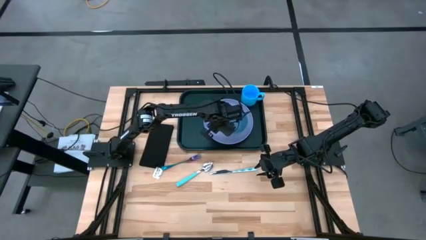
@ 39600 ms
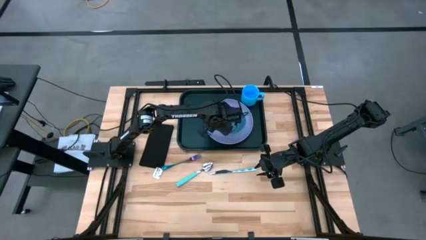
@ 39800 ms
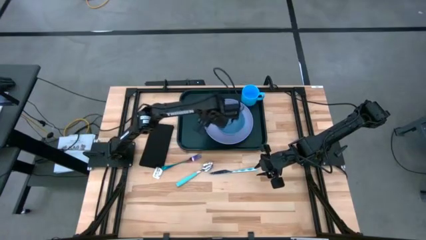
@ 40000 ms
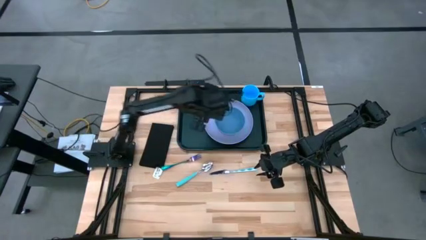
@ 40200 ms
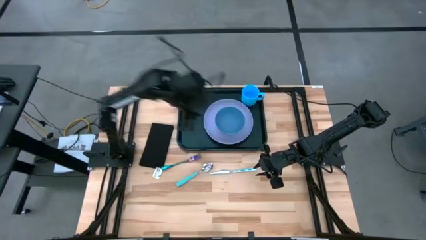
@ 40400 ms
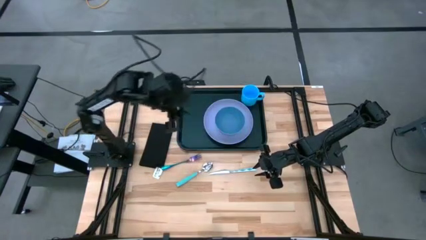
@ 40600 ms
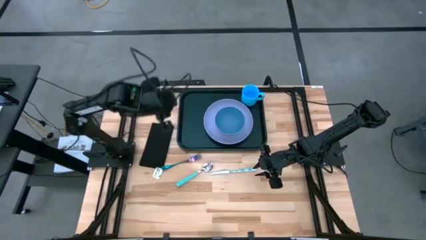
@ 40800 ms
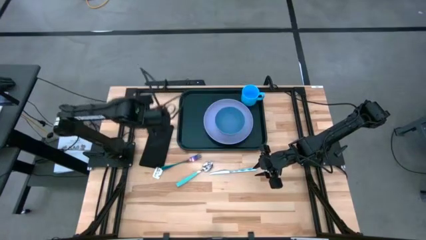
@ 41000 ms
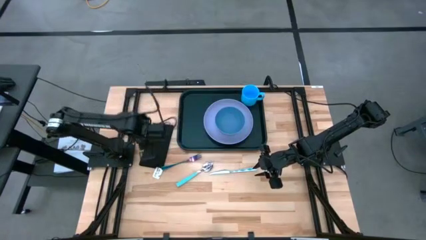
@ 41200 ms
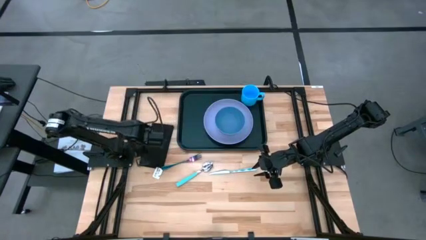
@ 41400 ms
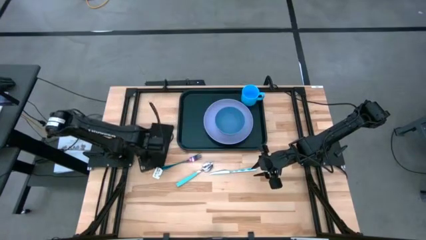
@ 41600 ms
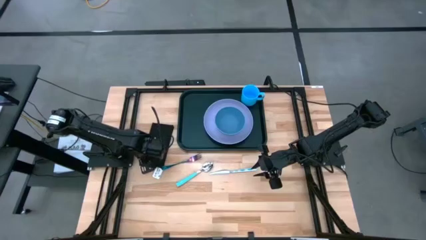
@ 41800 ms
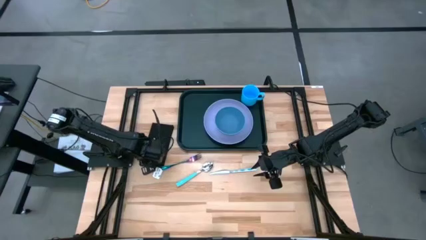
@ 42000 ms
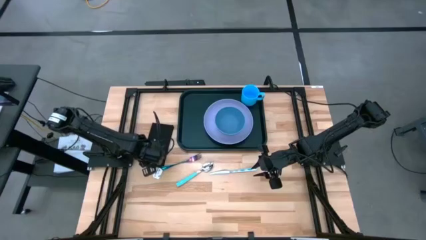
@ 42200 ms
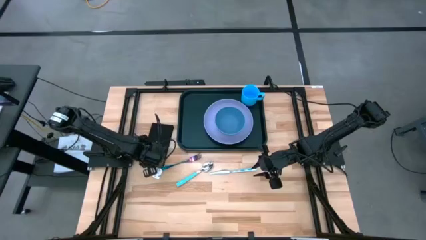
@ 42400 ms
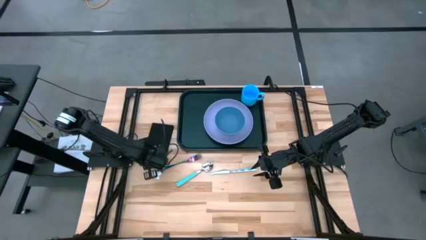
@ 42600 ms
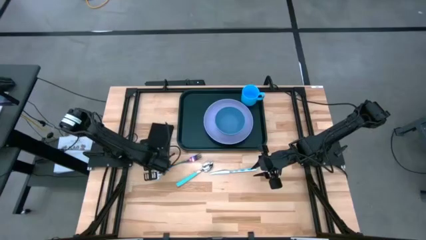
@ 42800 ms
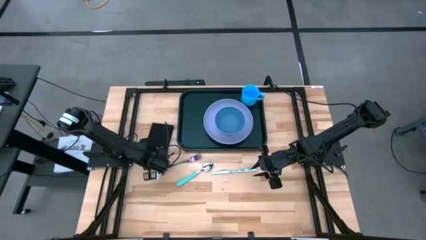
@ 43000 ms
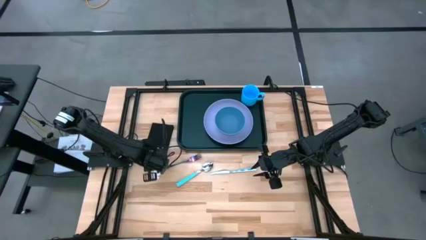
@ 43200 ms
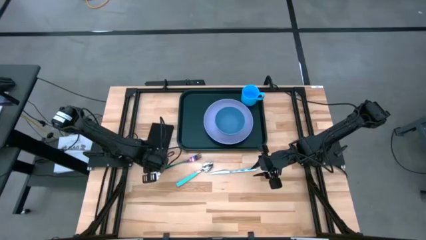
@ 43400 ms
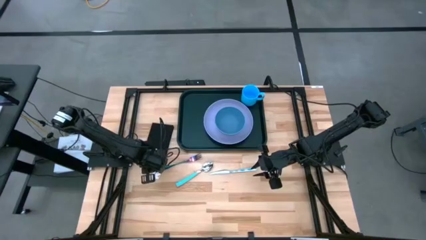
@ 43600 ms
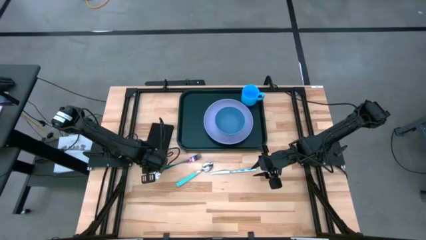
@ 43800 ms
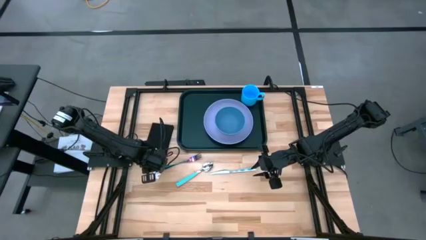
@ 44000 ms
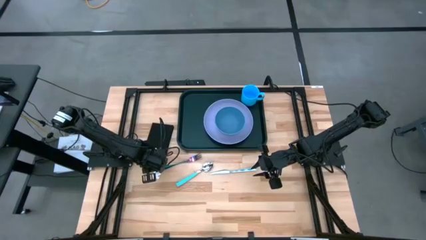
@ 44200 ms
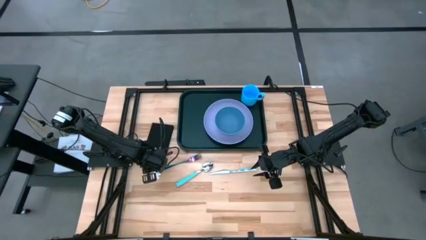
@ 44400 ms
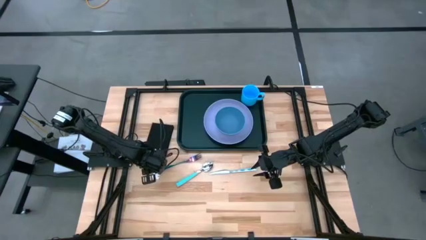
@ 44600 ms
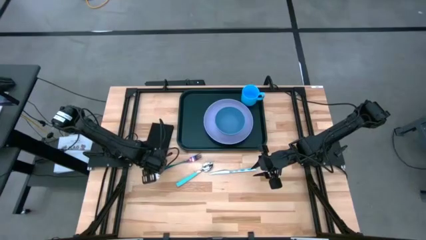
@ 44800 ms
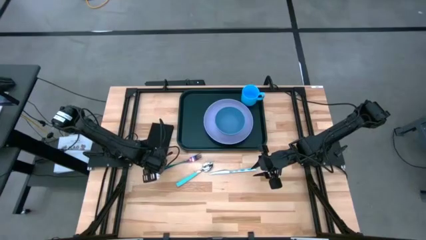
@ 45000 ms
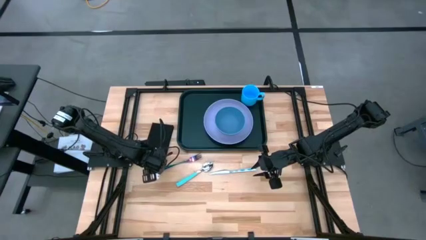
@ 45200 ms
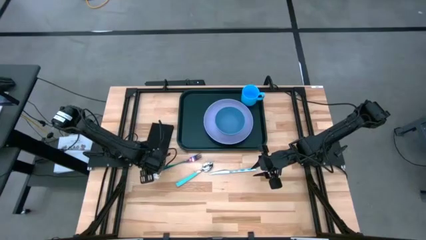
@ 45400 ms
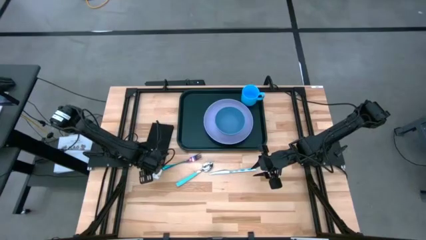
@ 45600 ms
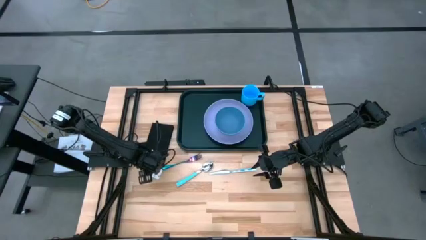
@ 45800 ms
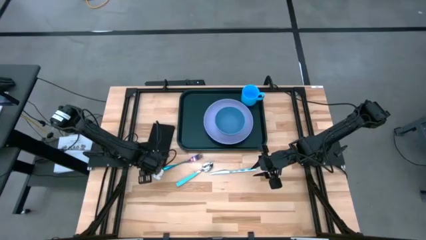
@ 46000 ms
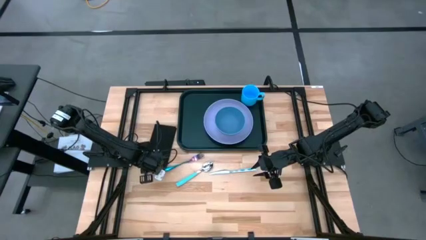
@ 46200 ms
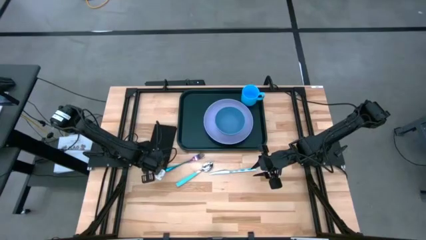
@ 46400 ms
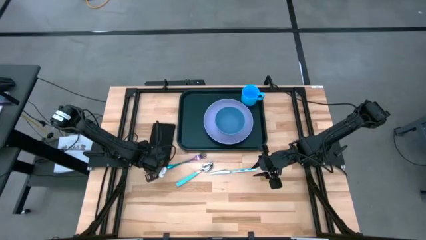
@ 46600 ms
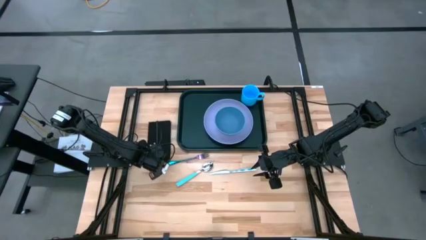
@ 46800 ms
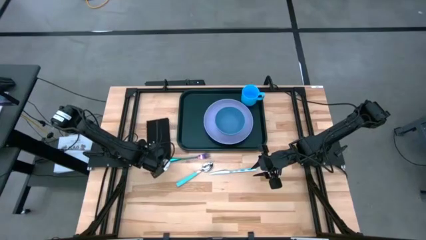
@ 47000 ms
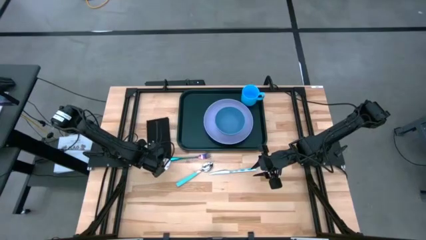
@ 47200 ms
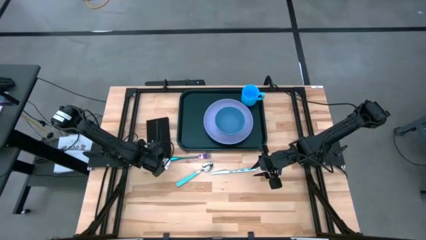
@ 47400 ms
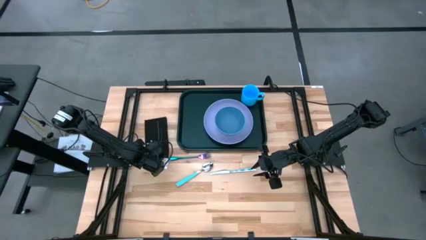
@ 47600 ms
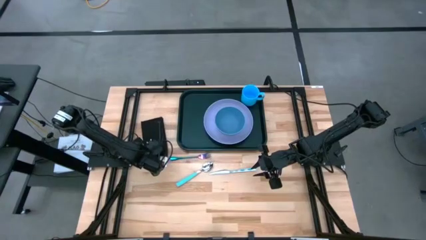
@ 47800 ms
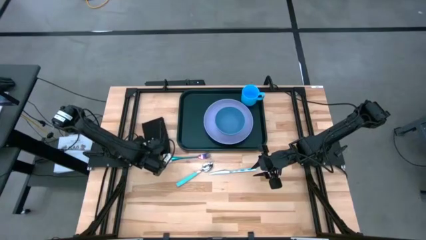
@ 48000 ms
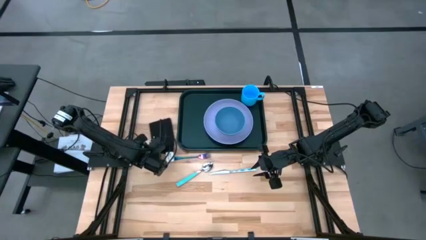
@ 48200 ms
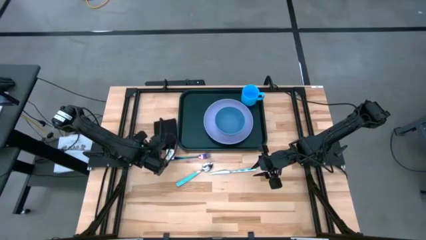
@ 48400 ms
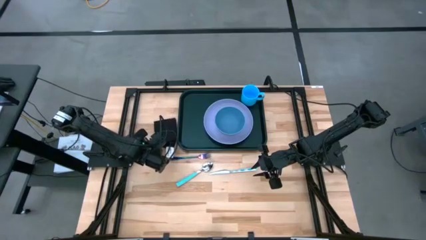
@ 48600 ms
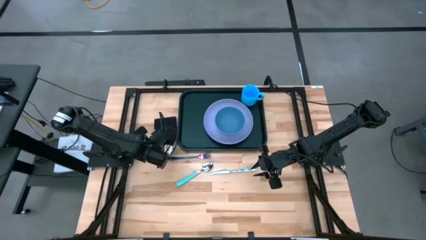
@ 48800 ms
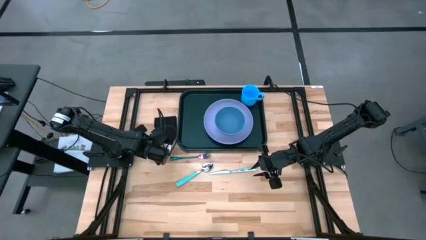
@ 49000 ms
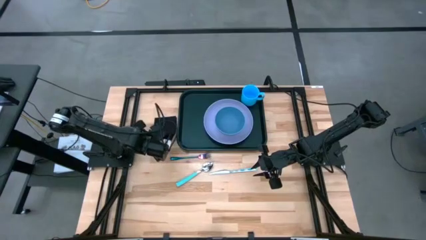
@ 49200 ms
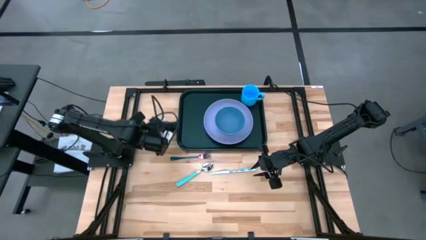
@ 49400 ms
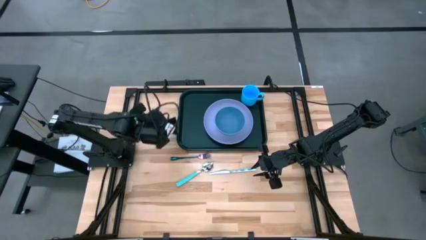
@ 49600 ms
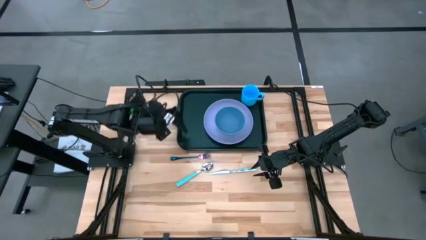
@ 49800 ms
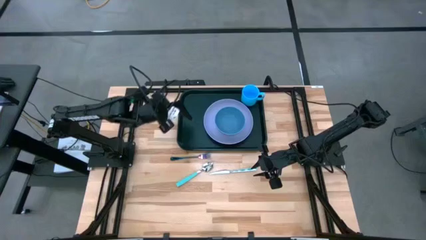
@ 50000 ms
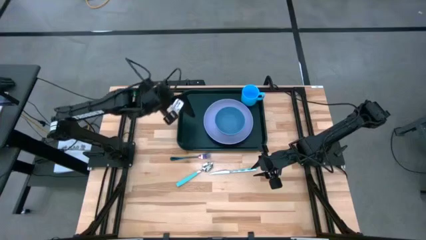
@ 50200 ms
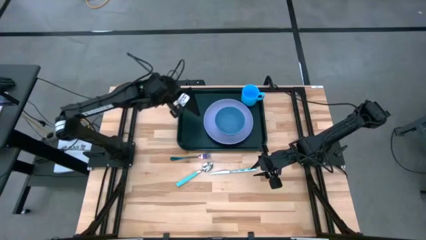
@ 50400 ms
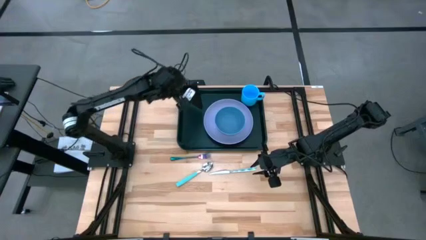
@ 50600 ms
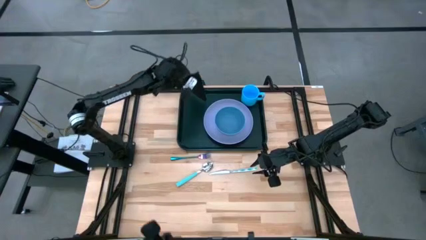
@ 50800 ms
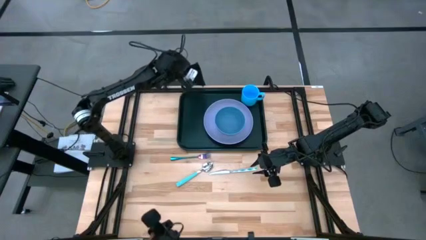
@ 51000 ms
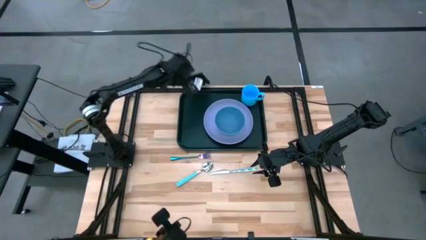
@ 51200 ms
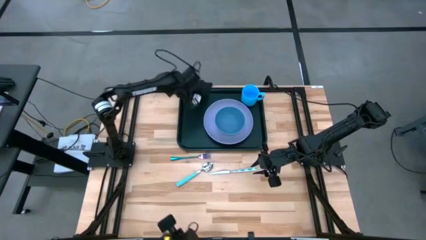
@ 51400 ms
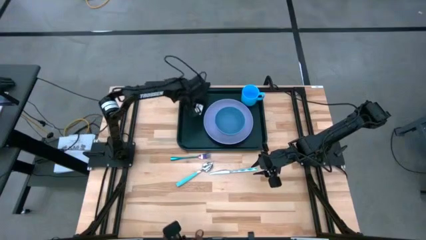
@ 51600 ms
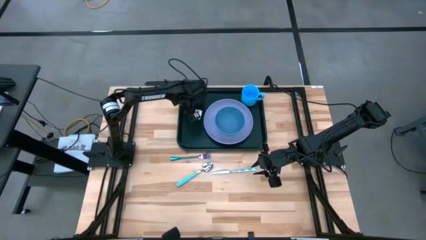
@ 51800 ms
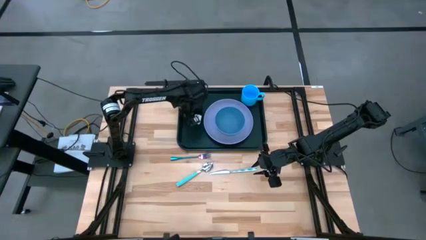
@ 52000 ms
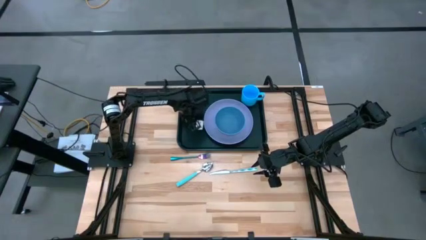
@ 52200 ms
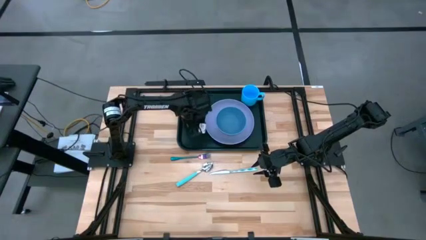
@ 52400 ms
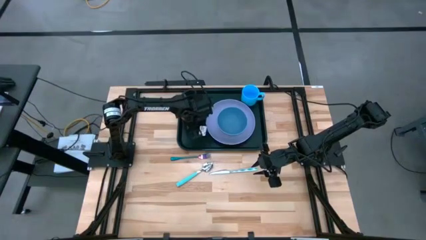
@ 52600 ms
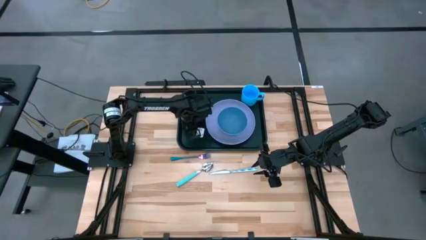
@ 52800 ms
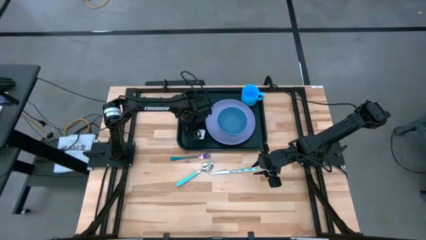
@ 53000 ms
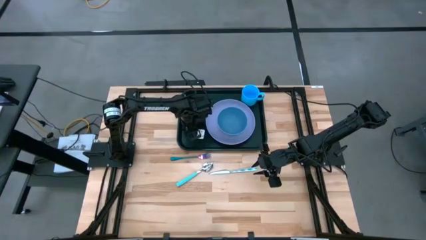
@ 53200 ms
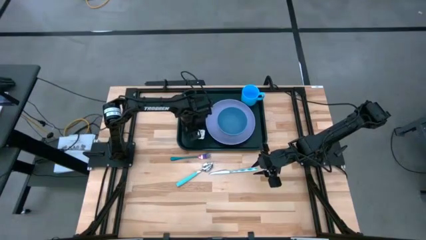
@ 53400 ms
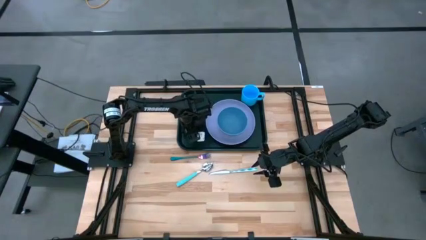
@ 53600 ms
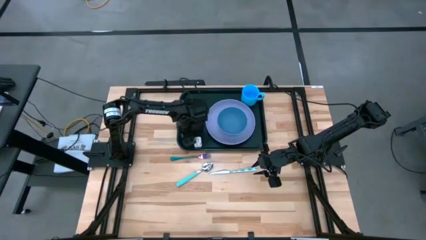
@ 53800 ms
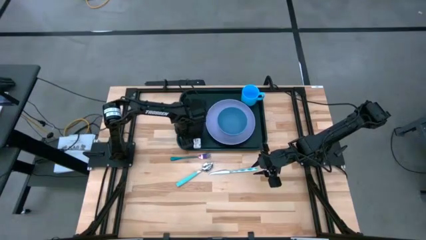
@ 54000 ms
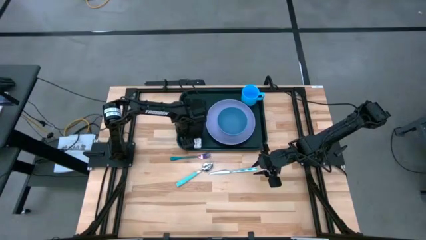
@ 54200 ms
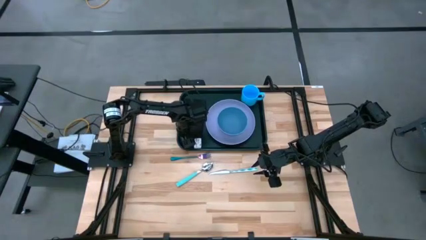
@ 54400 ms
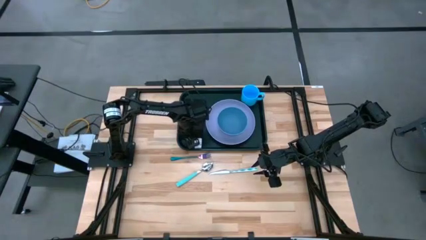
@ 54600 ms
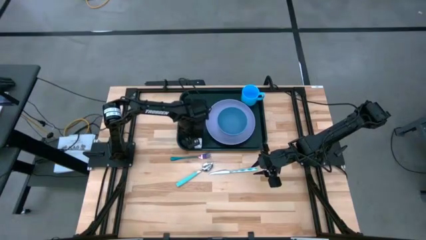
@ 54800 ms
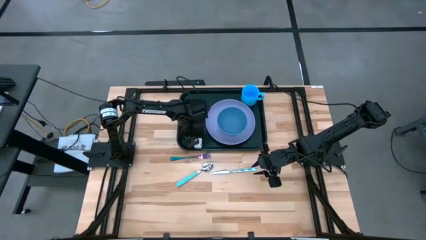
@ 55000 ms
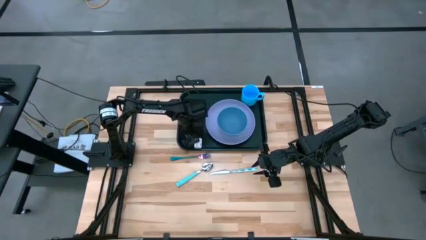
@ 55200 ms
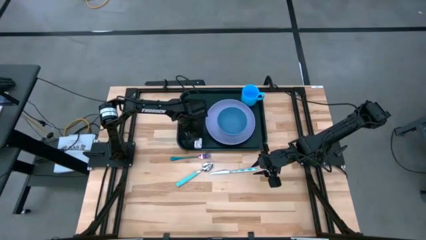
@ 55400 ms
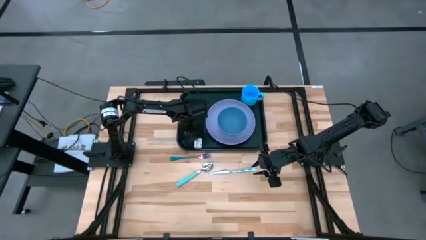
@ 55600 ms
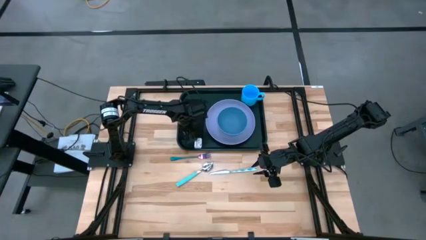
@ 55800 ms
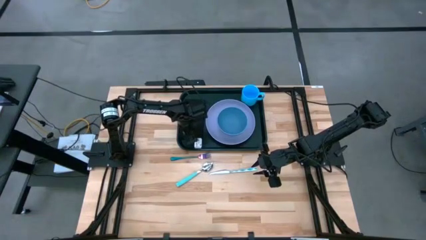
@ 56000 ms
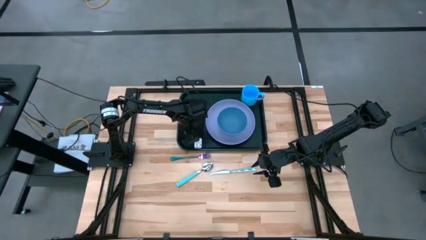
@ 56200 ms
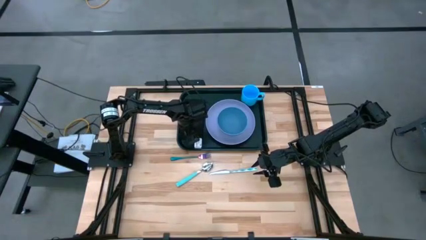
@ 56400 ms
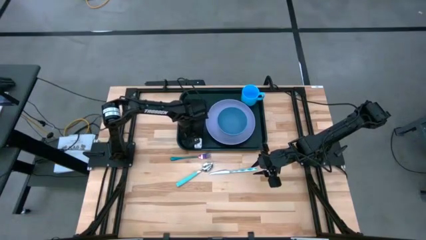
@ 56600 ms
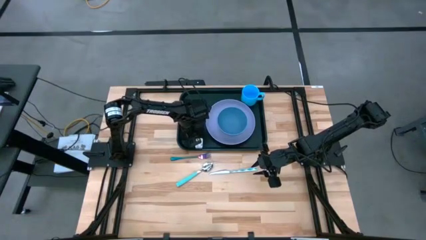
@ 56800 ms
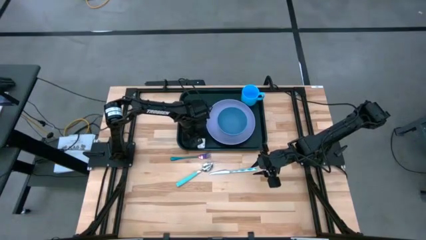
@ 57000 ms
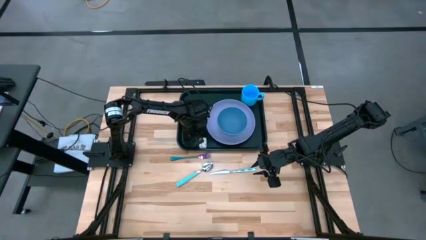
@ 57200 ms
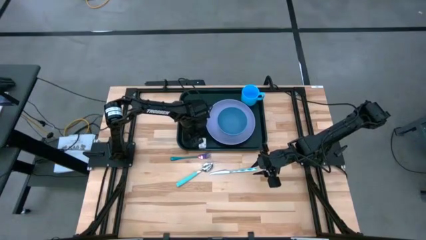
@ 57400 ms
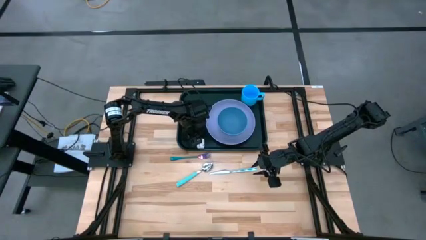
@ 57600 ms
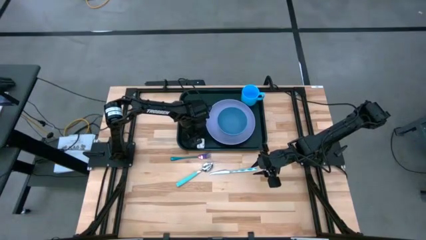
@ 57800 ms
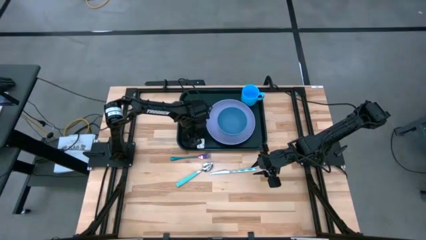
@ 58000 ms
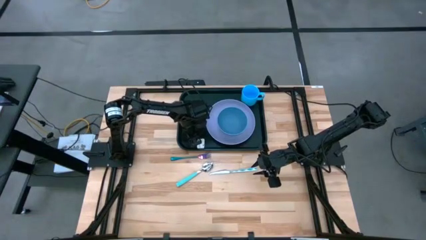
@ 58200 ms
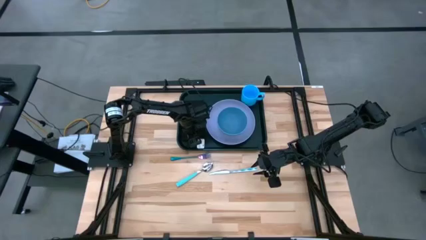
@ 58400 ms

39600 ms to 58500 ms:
Task: Set up tray
Put the napkin to the left side of the purple plate and blue bowl on the black serving tray
